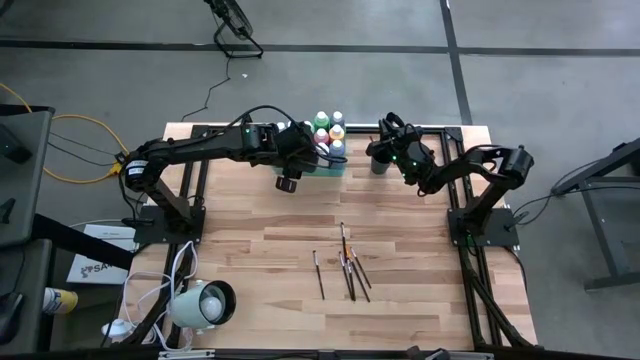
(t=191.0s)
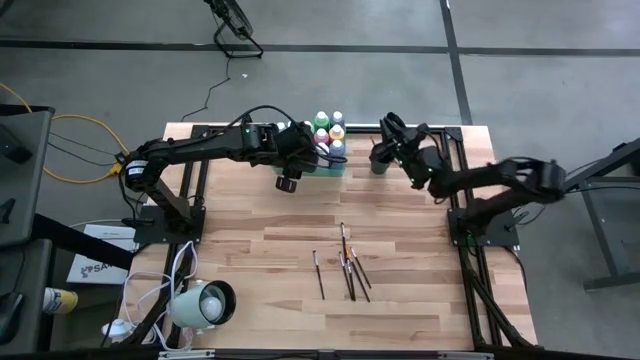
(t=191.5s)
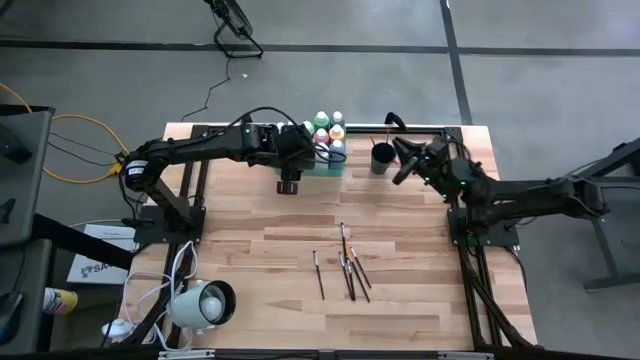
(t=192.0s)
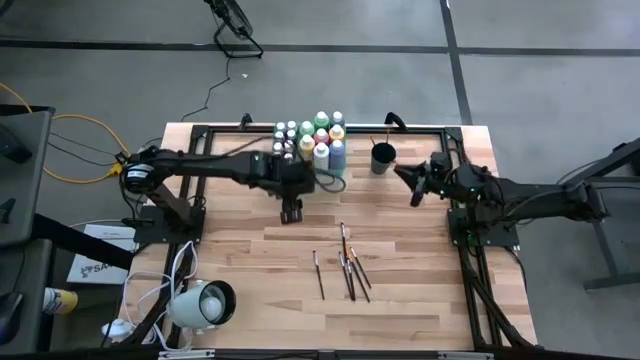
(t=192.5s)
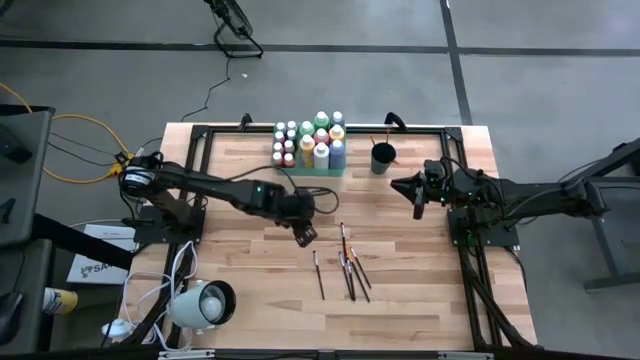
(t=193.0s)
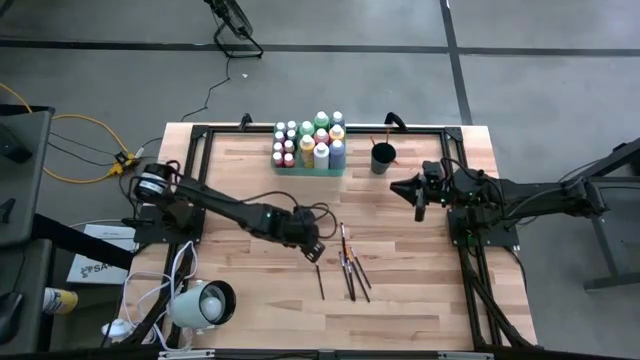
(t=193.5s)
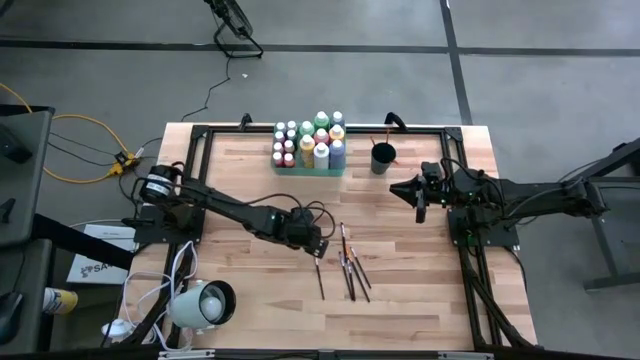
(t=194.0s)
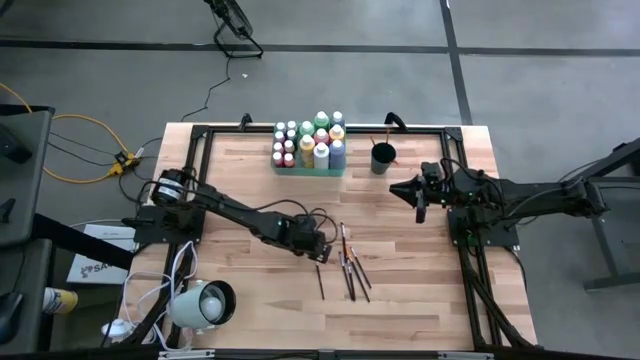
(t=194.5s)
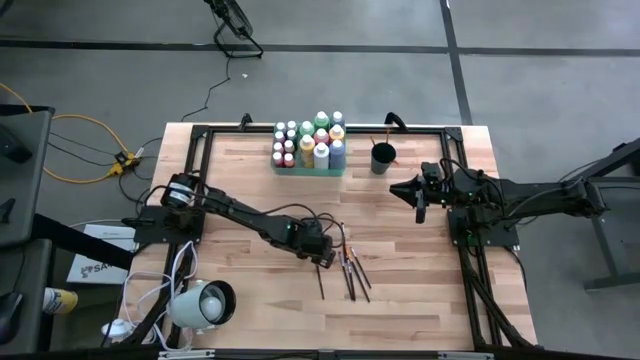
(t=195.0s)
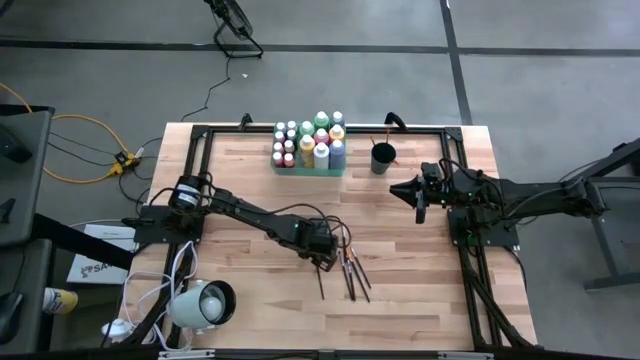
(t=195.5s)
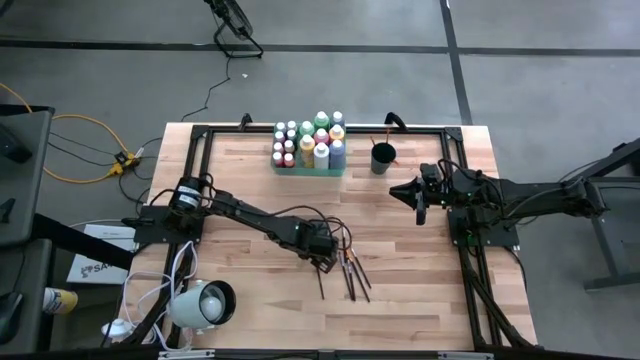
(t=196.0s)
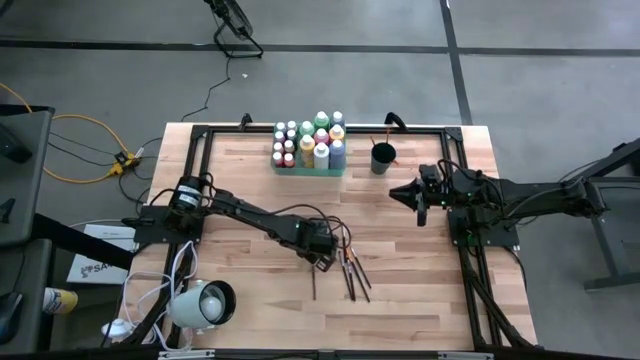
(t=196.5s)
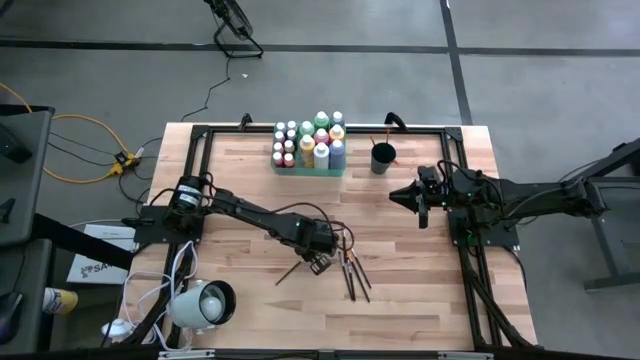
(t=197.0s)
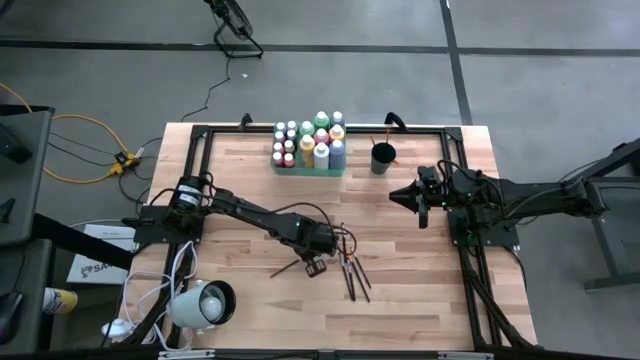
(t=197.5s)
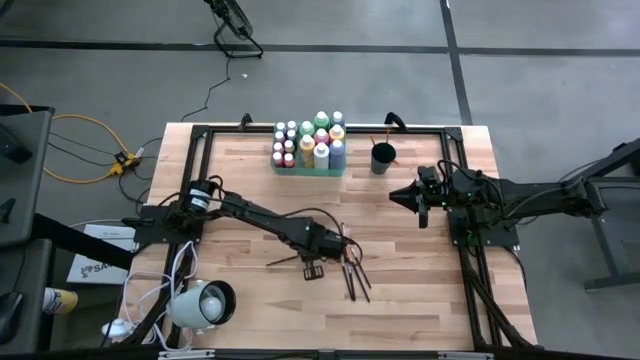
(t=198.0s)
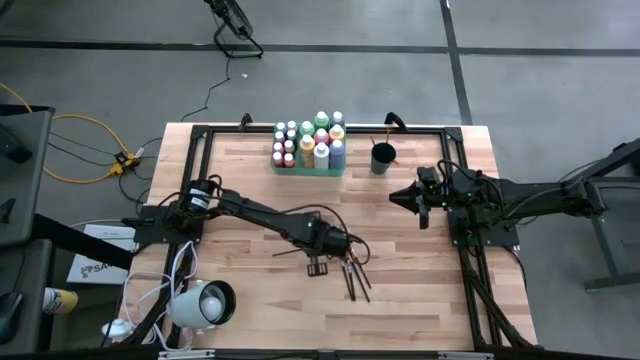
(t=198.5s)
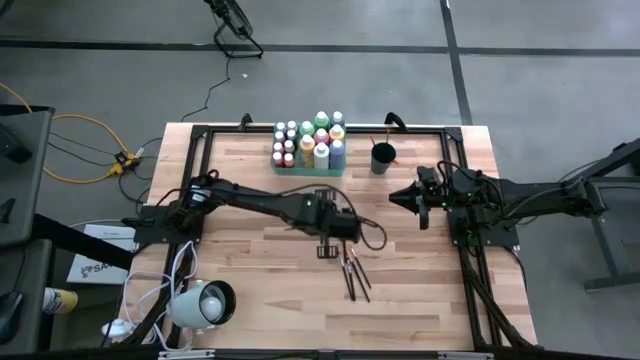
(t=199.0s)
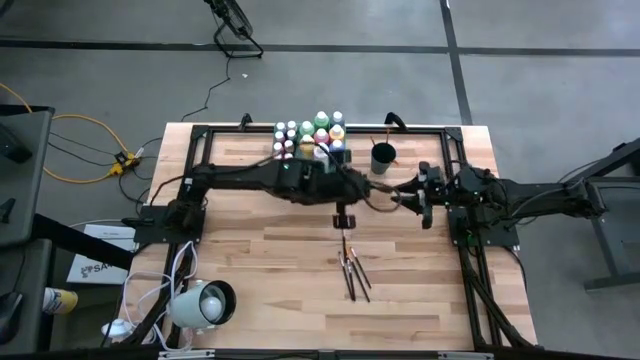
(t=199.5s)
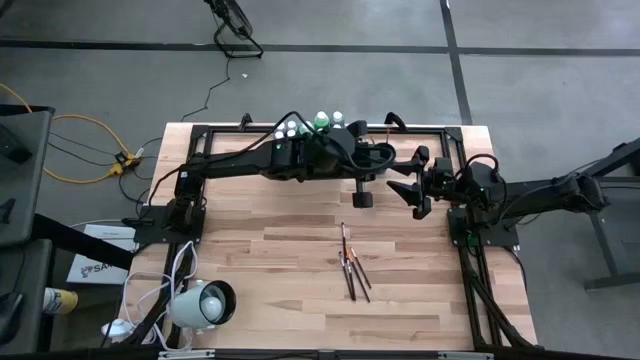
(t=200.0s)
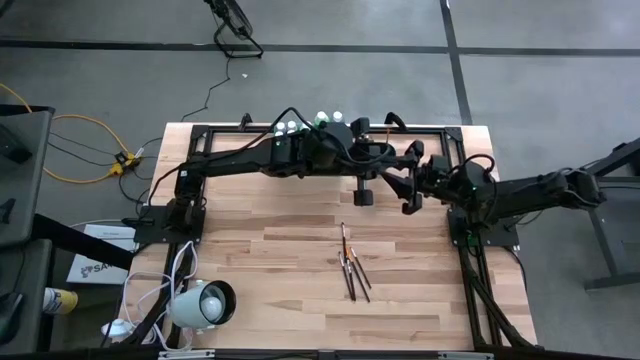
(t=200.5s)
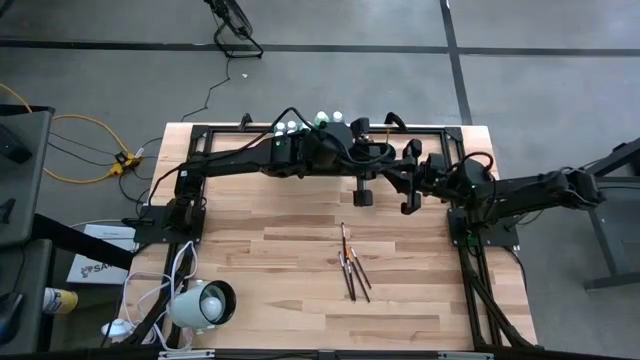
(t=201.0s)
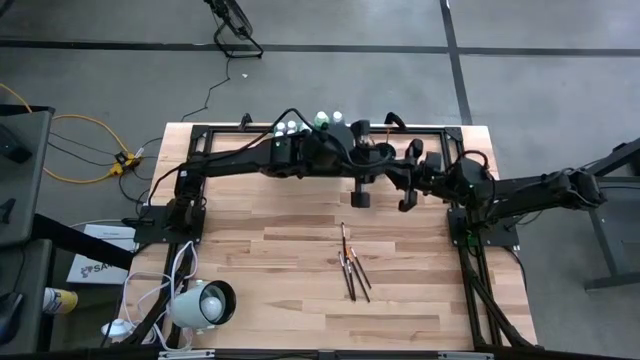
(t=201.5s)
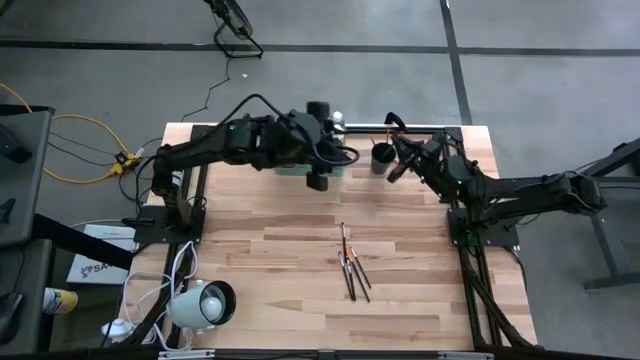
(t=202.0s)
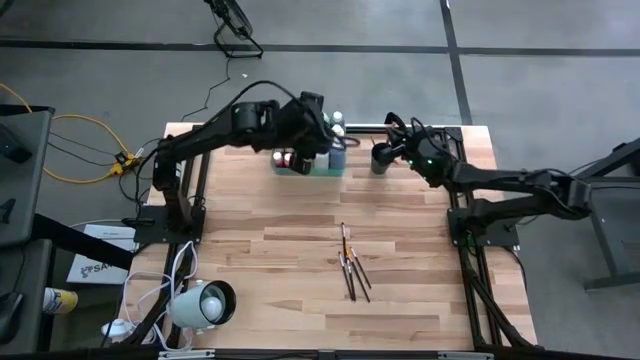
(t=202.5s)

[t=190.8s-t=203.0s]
Task: Pick & Place Paint Supplies
Put the silver paint brush into the green cup

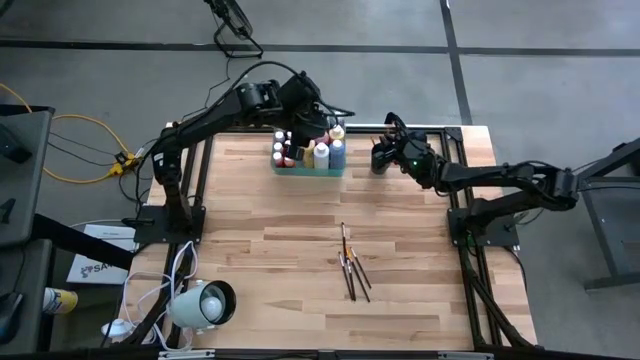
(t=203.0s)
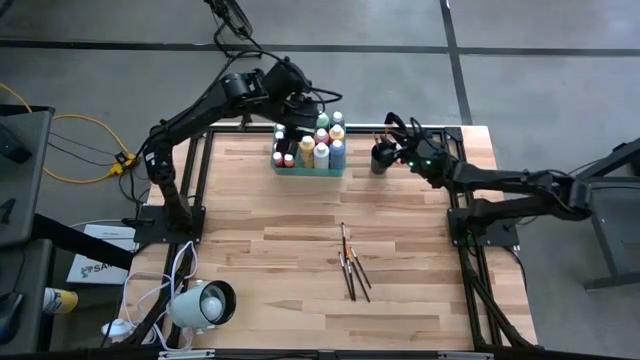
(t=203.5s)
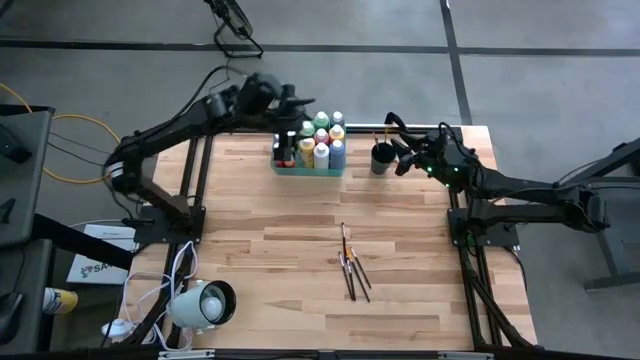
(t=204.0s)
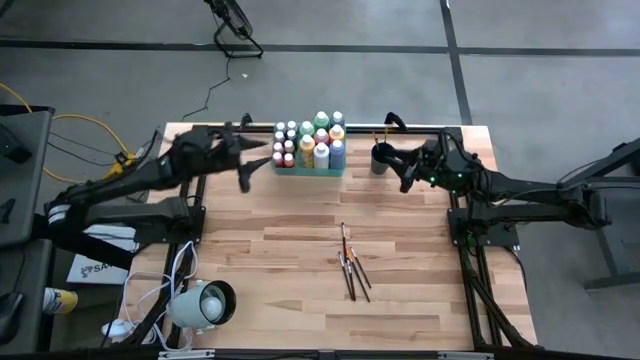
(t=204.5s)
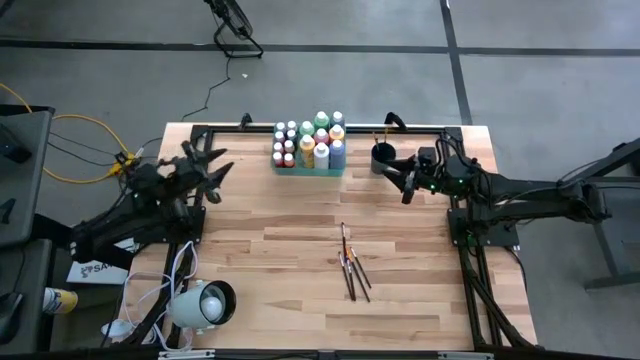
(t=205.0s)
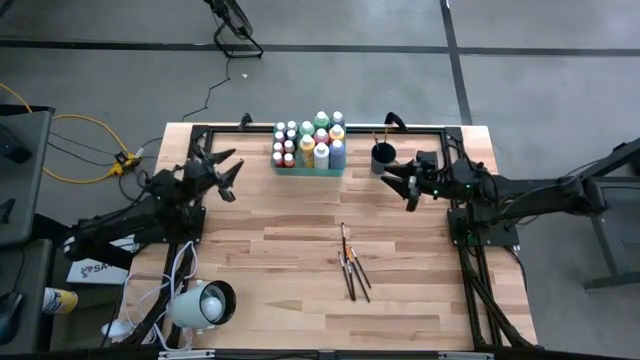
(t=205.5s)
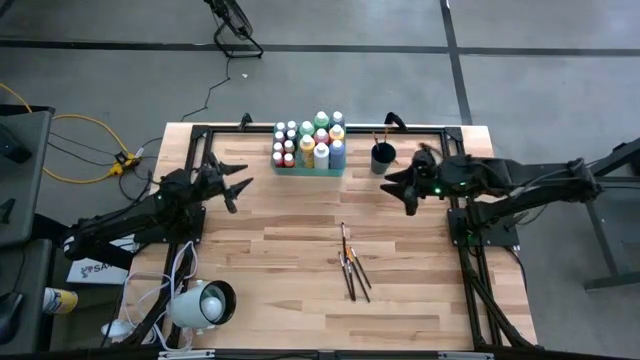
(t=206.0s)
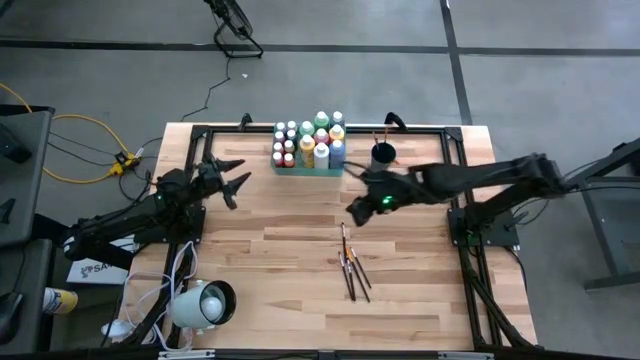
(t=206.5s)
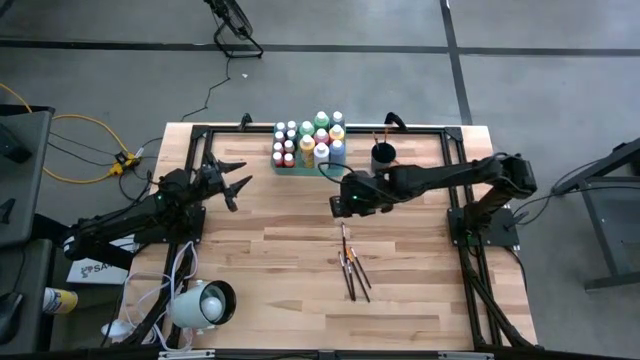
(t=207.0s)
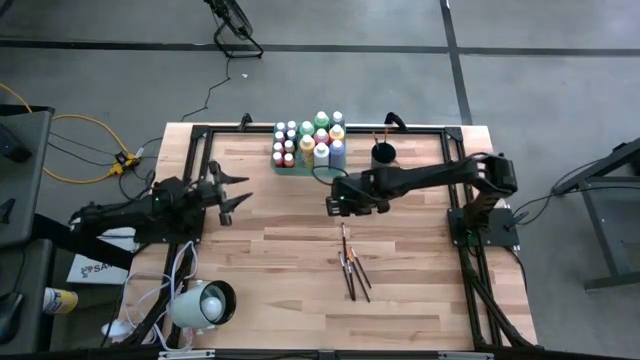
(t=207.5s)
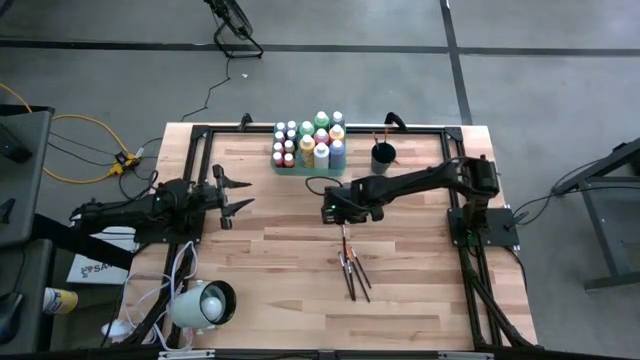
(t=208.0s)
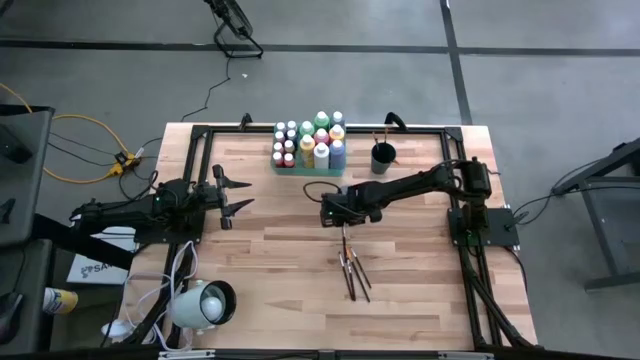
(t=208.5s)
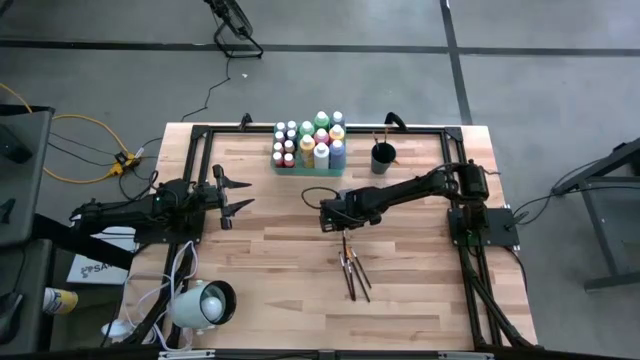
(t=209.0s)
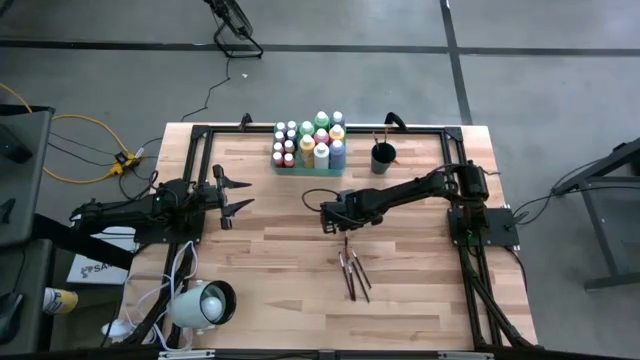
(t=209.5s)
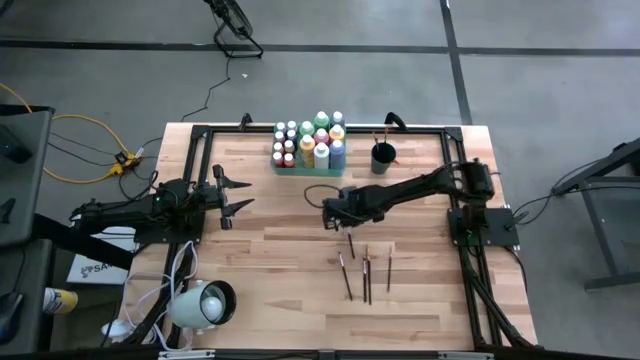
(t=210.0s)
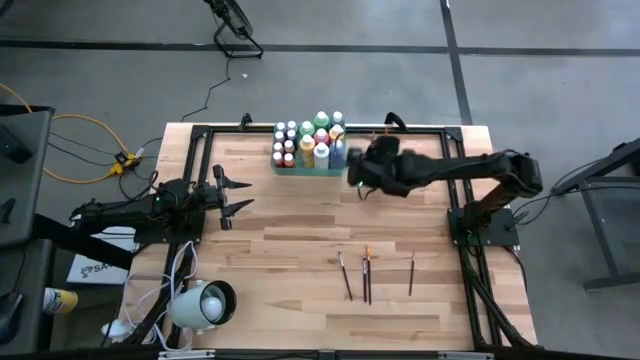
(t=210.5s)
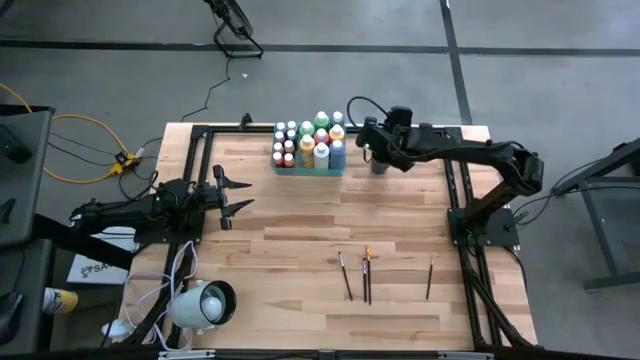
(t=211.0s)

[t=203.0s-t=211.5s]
Put the silver paint brush into the green cup
